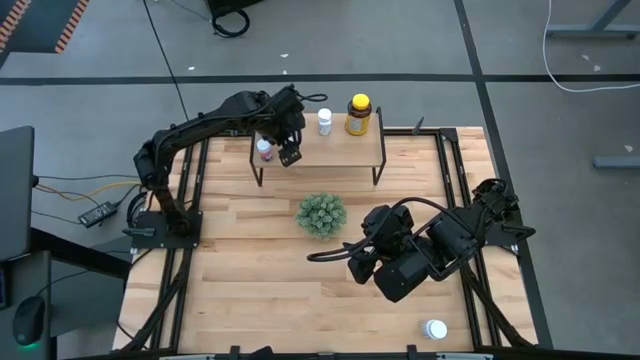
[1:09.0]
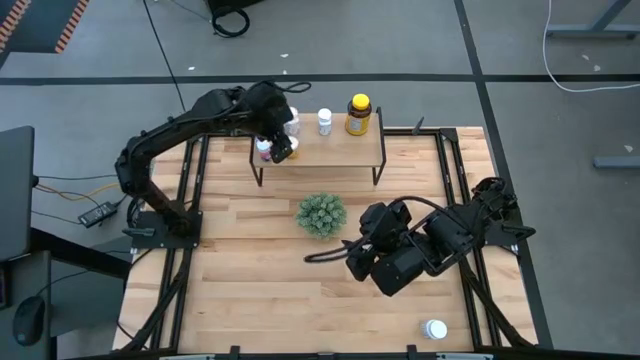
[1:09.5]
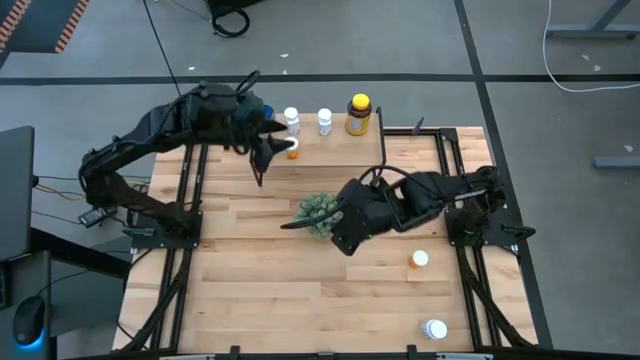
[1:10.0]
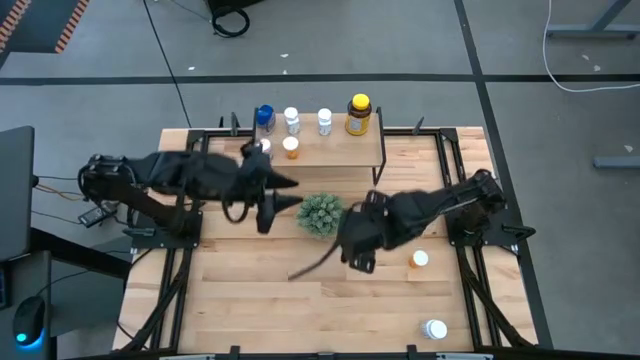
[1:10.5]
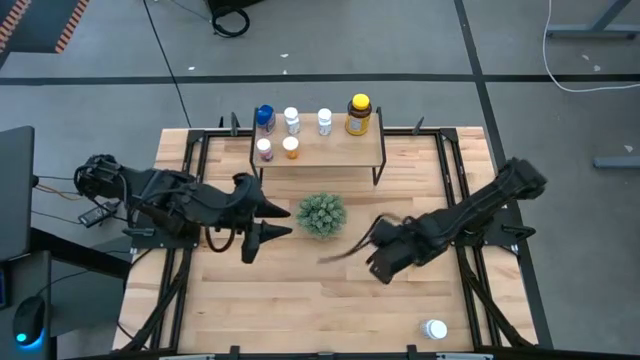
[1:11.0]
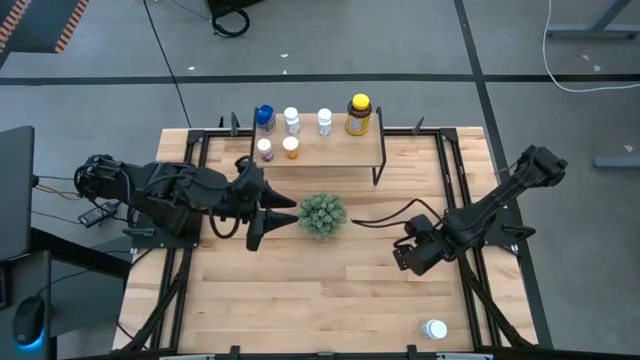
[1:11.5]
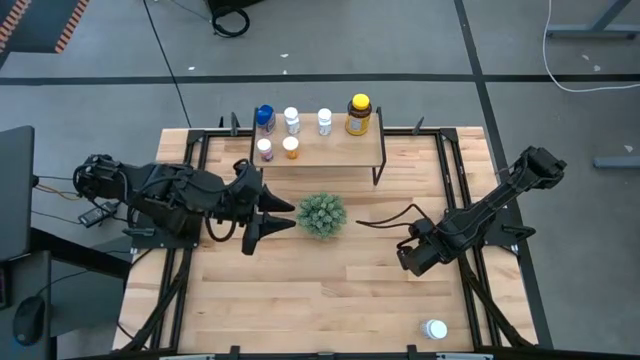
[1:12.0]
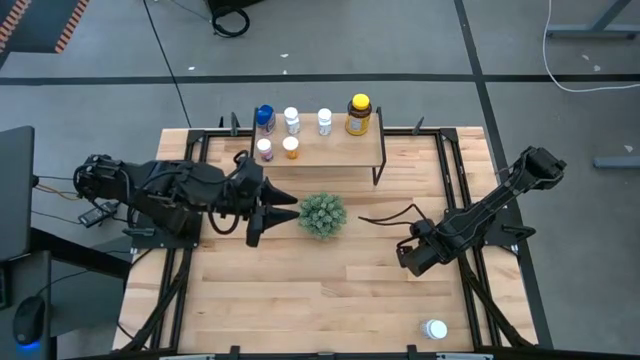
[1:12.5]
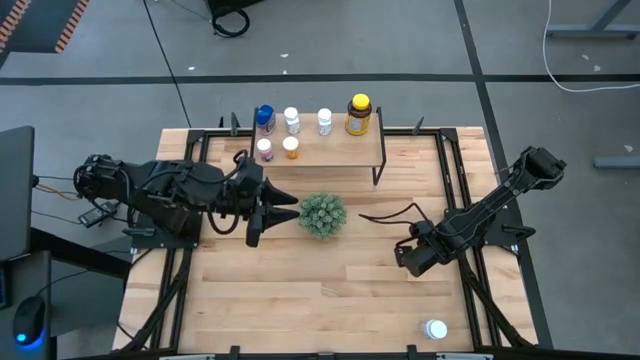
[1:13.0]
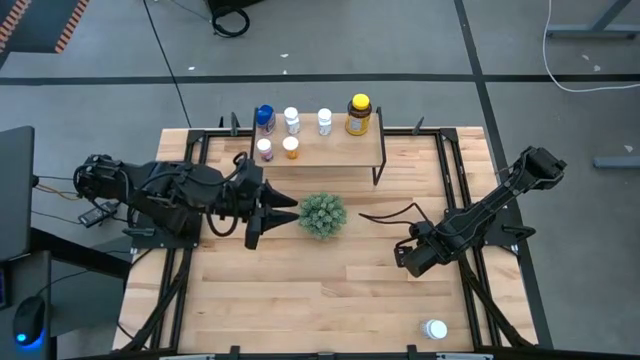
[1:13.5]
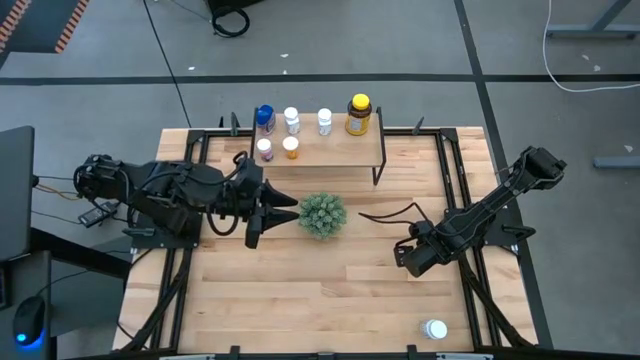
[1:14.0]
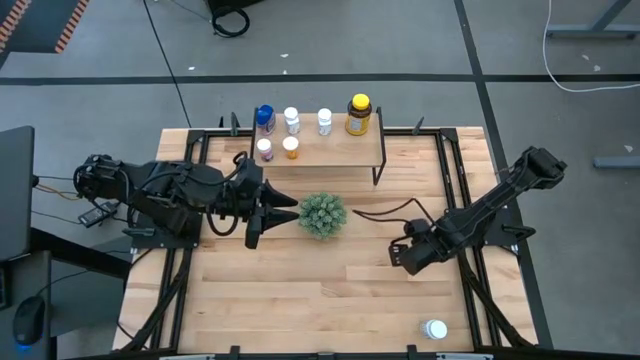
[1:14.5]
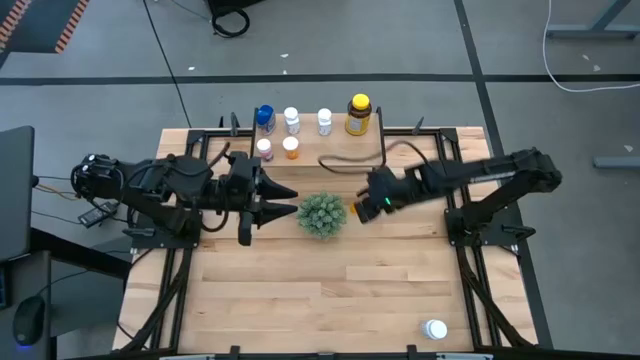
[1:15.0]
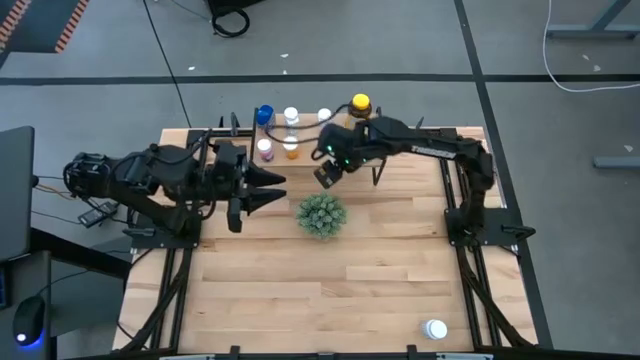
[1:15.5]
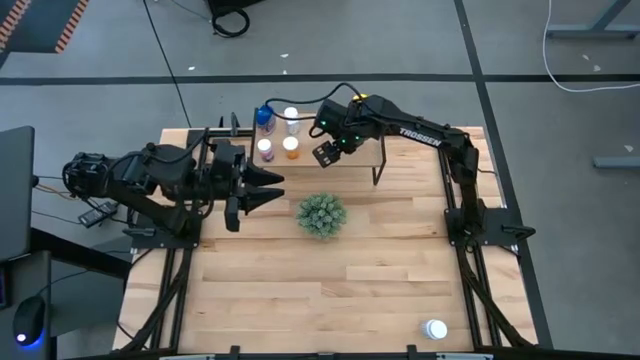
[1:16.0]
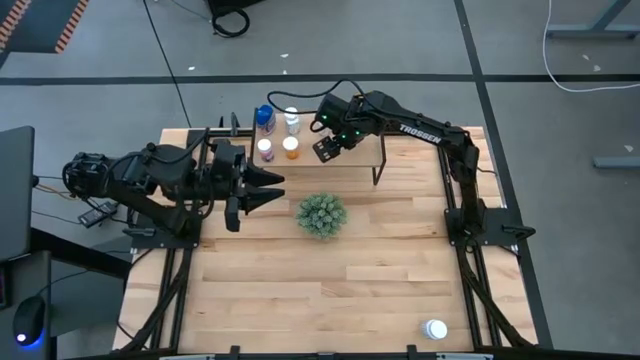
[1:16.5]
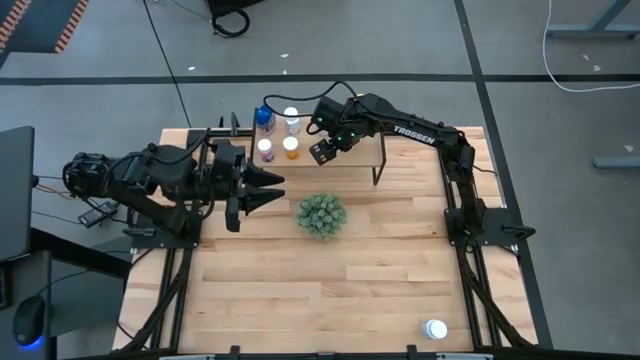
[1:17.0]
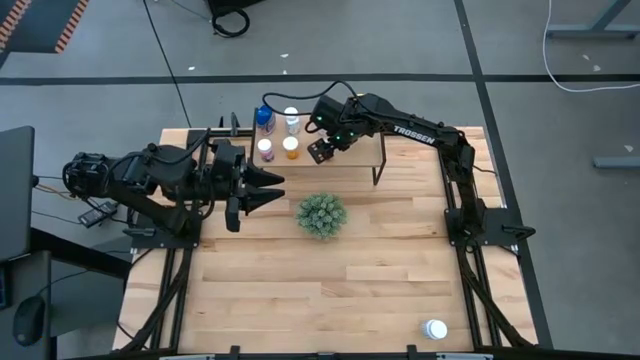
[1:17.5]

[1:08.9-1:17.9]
Task: Pick and place medicine bottles onto shelf by color
Put the orange medicine bottle on the shelf

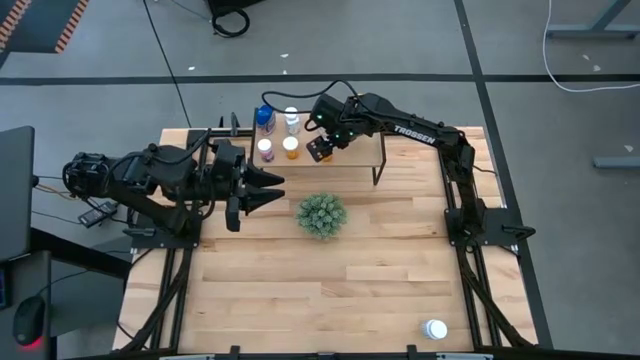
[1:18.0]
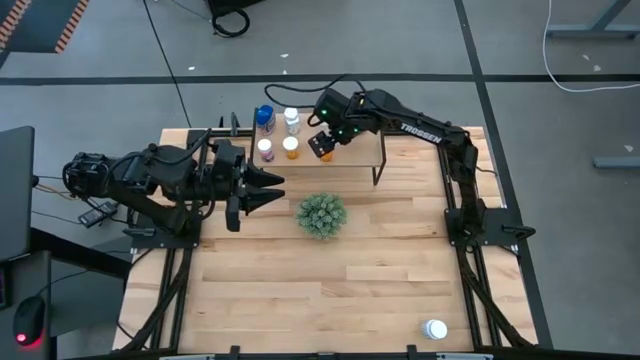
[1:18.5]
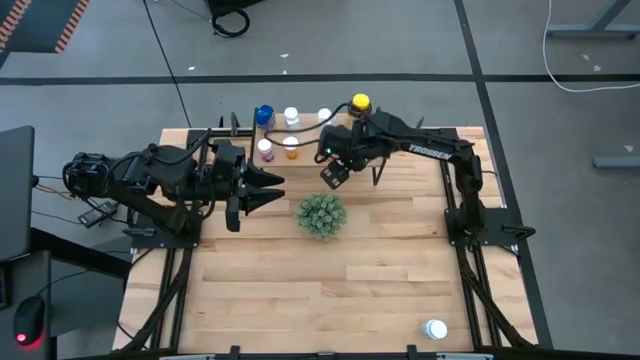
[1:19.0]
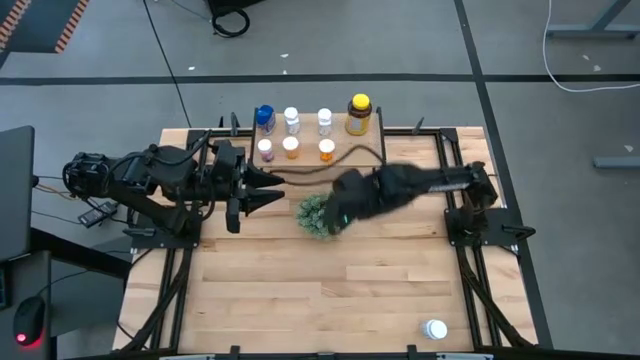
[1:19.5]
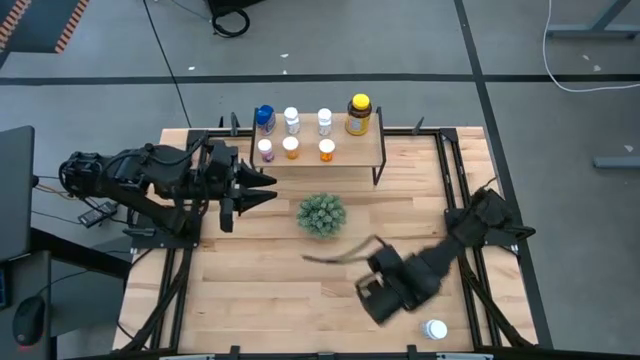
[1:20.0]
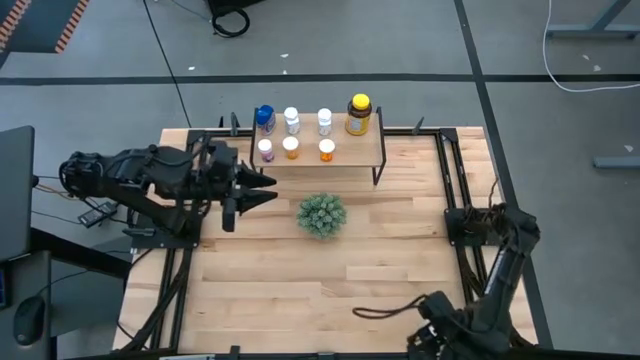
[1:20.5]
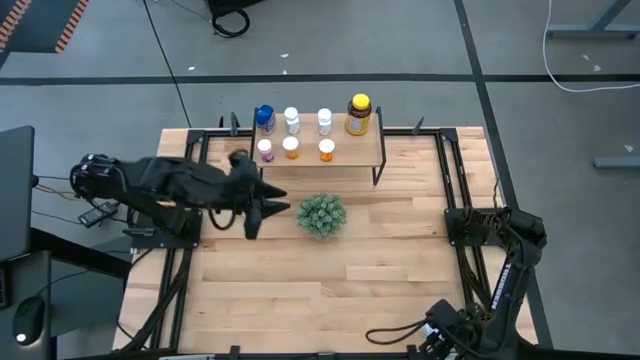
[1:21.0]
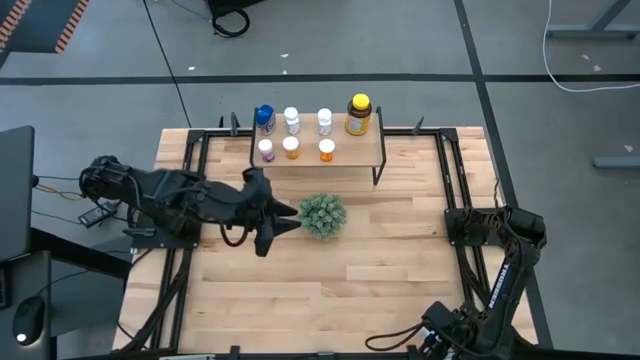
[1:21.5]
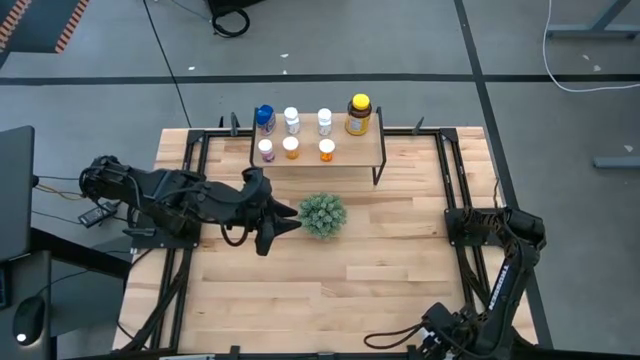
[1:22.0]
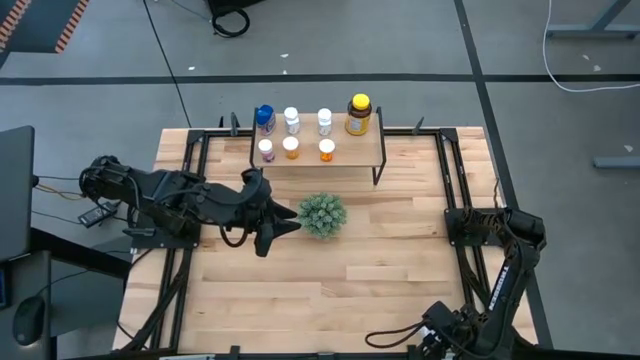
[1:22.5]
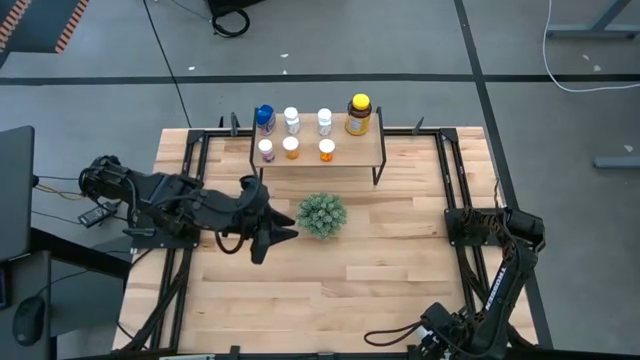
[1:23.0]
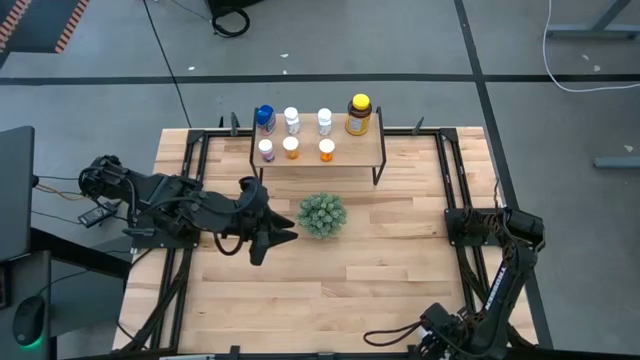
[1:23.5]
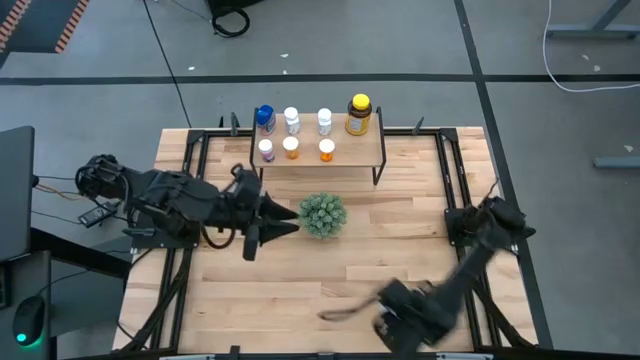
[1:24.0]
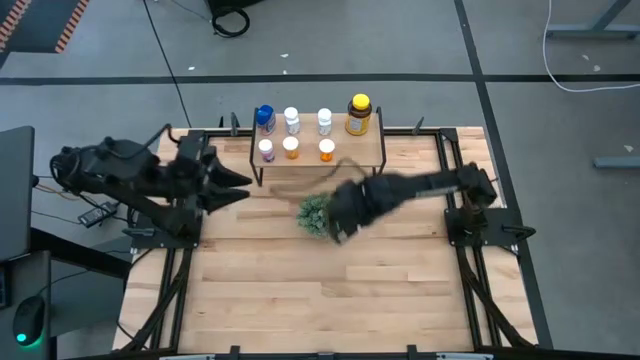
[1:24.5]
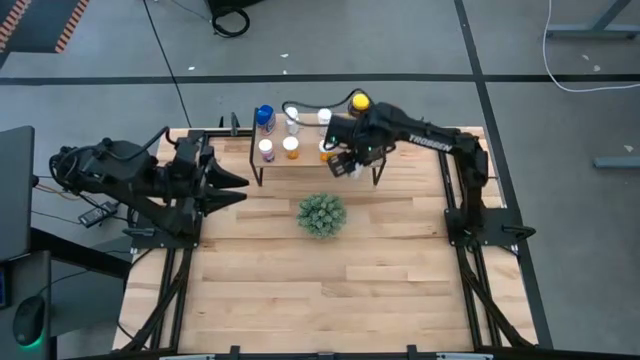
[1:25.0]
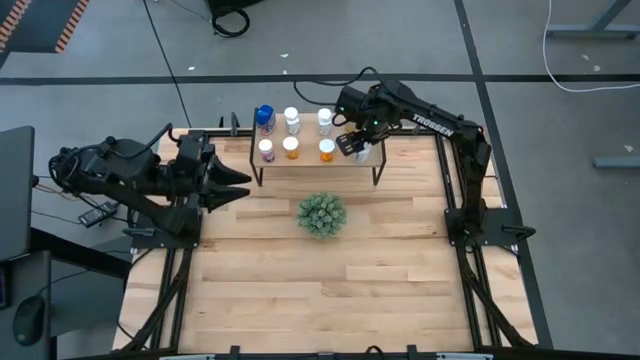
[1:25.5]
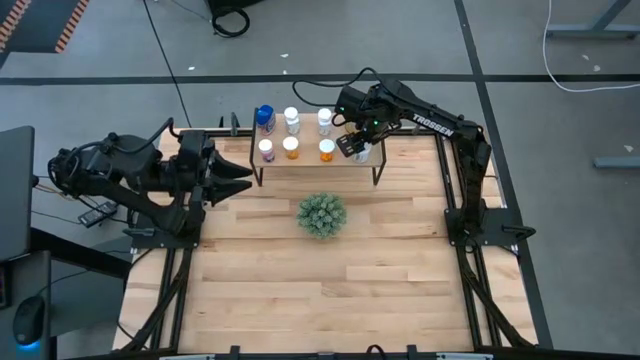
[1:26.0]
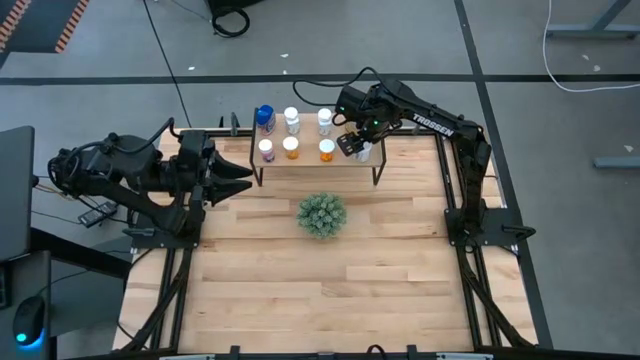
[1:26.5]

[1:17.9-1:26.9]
Put the white medicine bottle on the shelf

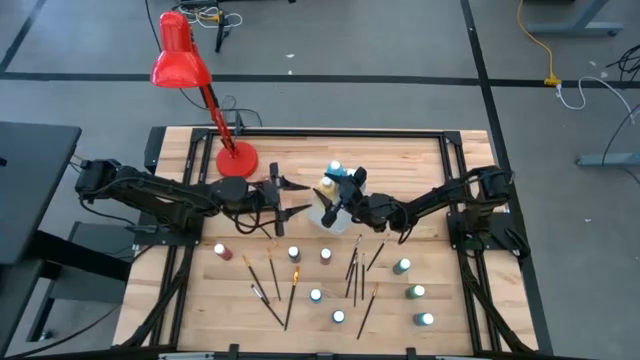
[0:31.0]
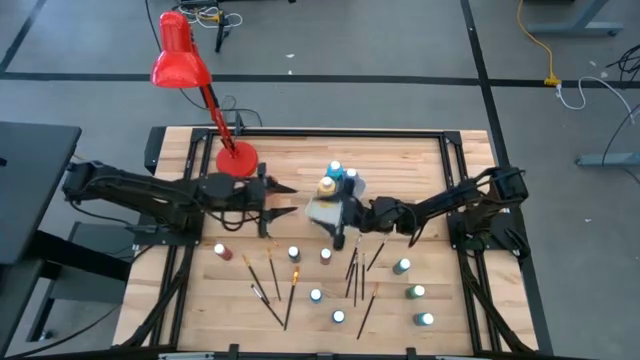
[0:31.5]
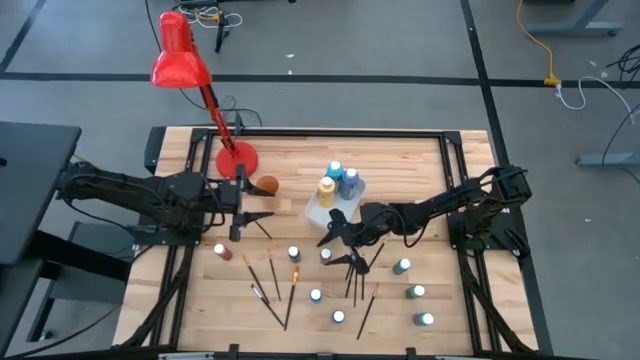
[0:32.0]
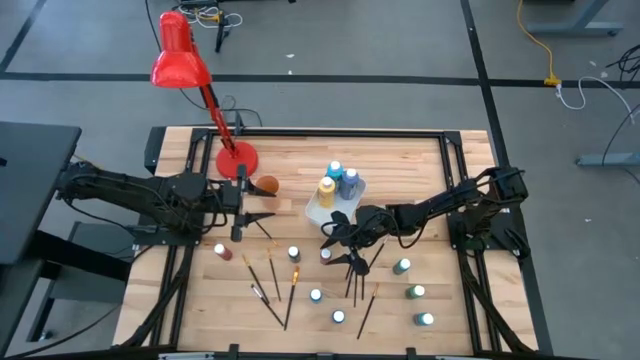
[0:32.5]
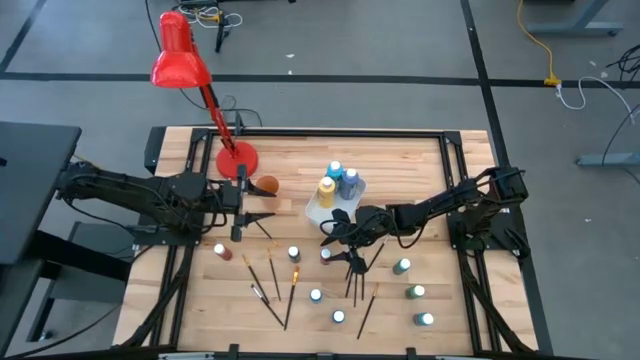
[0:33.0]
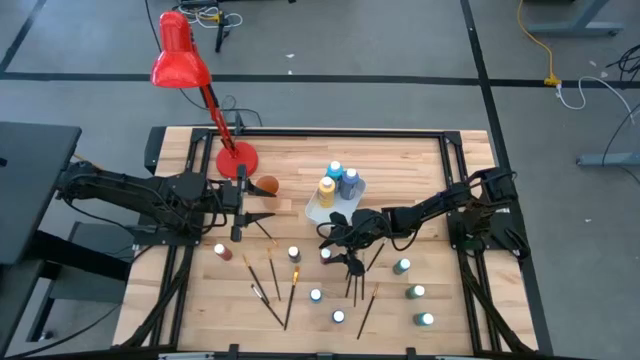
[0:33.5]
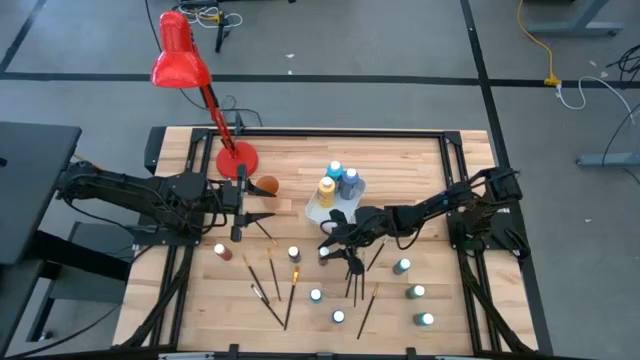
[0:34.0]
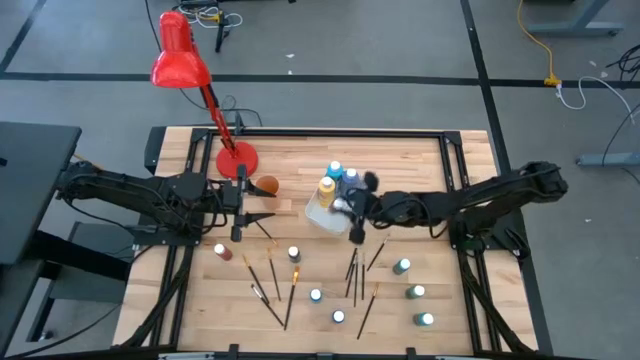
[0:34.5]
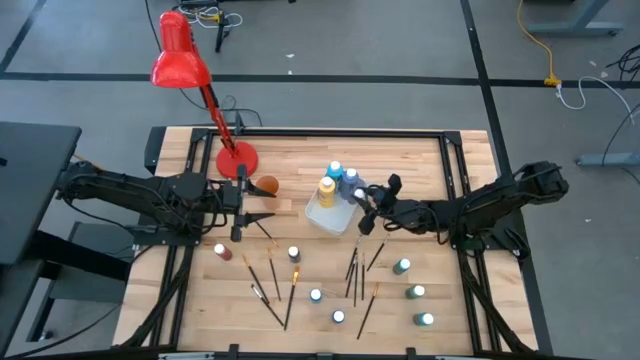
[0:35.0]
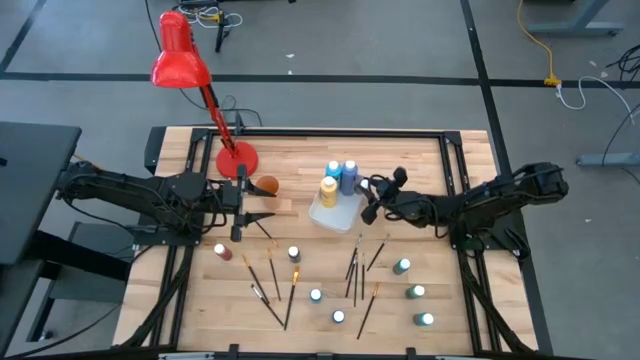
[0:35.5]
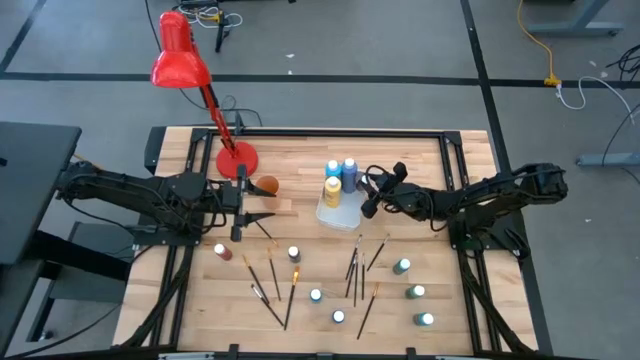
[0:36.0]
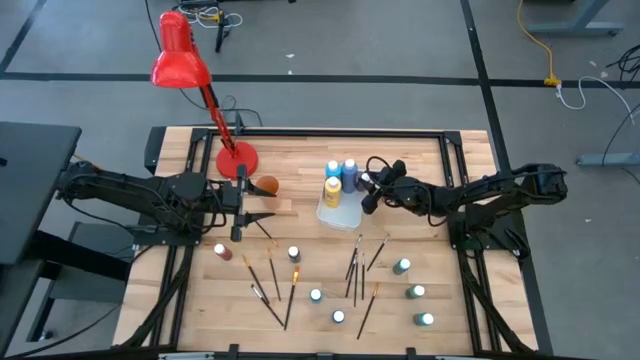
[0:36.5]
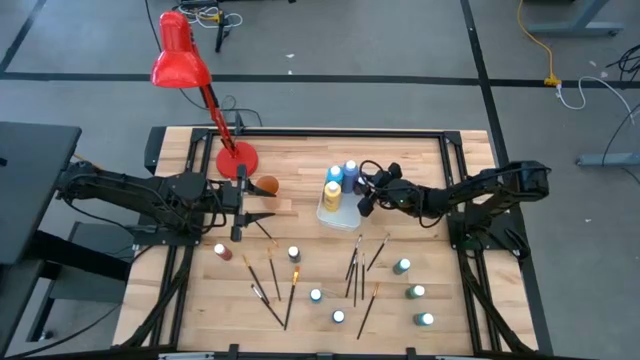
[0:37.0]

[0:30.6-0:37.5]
Task: Pick & Place Paint Supplies
Put the small red paint bottle into the white bin
